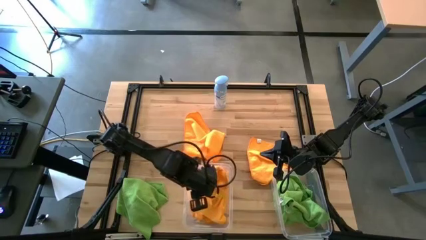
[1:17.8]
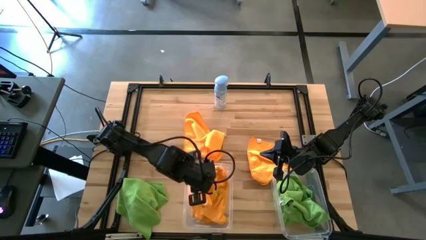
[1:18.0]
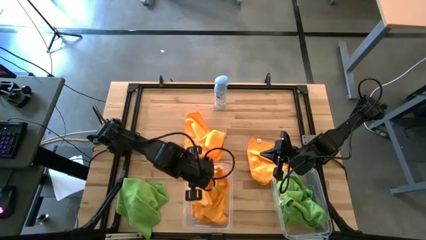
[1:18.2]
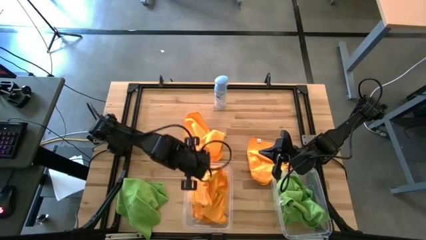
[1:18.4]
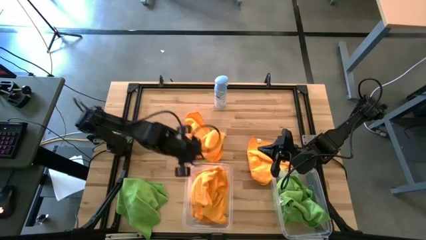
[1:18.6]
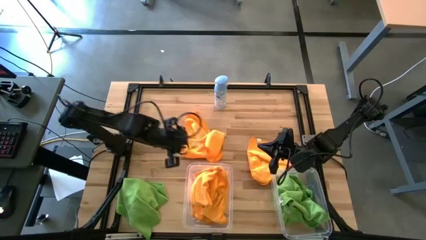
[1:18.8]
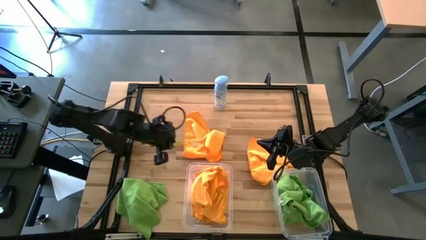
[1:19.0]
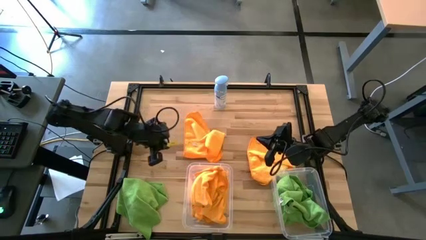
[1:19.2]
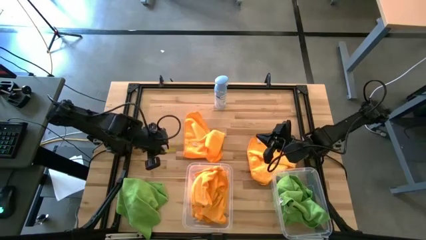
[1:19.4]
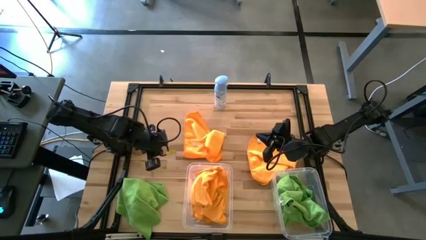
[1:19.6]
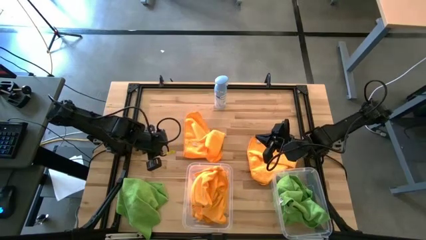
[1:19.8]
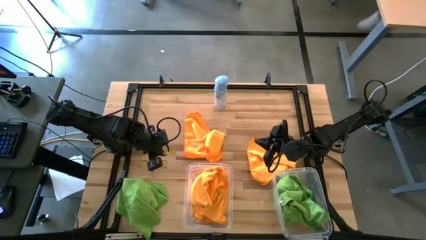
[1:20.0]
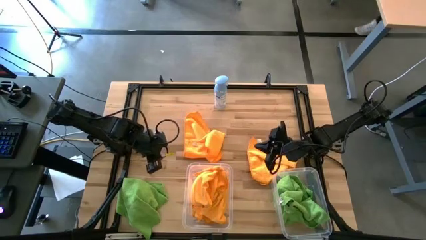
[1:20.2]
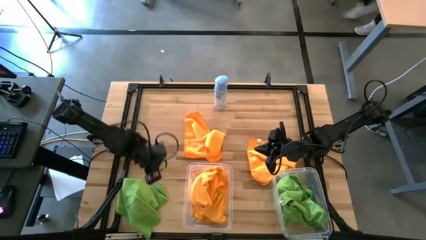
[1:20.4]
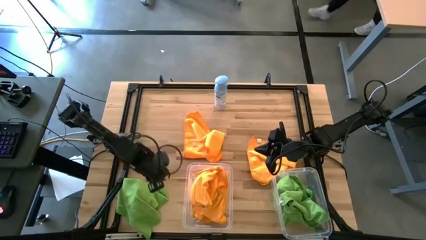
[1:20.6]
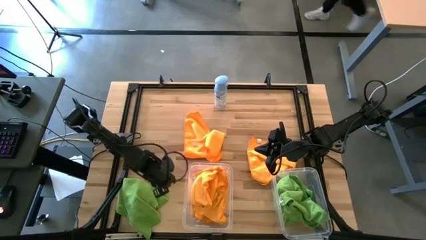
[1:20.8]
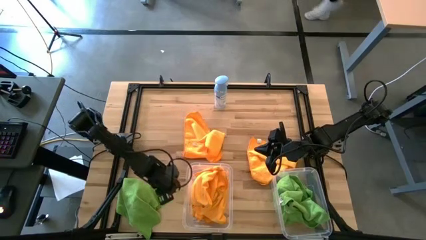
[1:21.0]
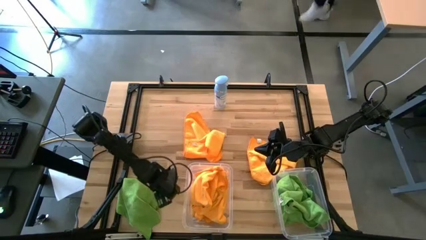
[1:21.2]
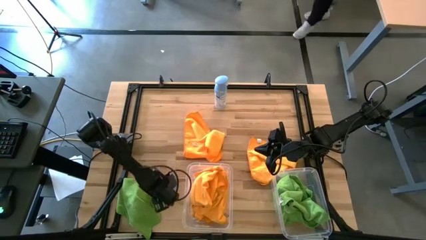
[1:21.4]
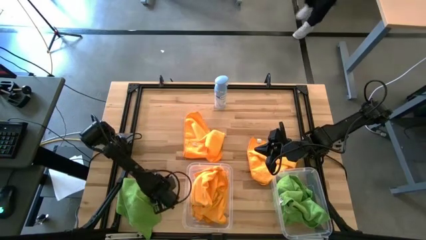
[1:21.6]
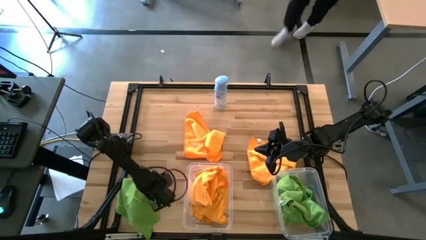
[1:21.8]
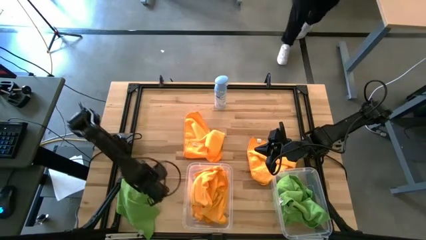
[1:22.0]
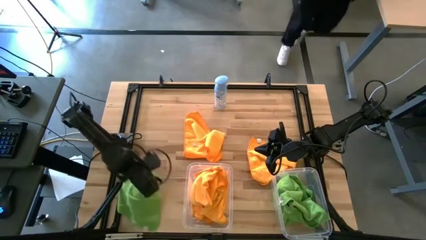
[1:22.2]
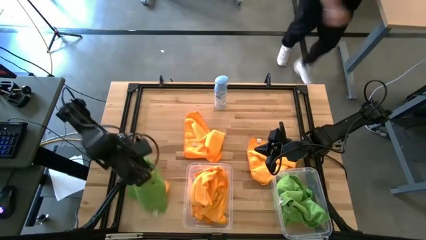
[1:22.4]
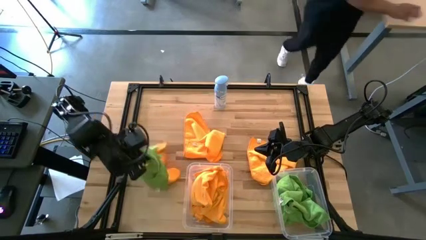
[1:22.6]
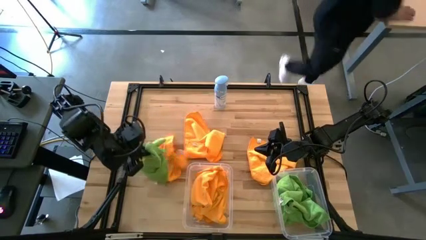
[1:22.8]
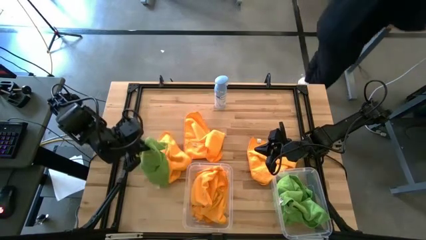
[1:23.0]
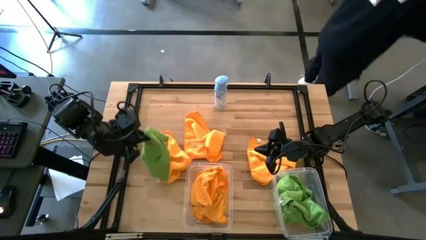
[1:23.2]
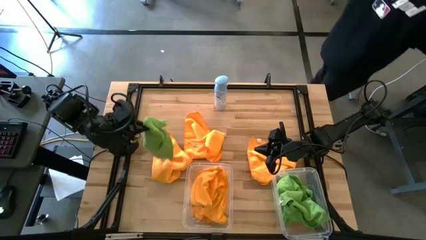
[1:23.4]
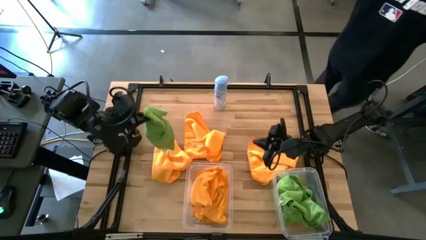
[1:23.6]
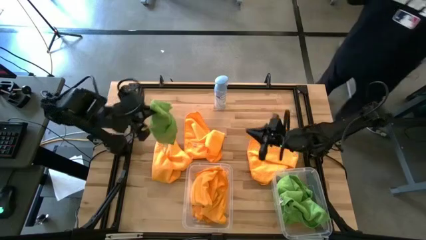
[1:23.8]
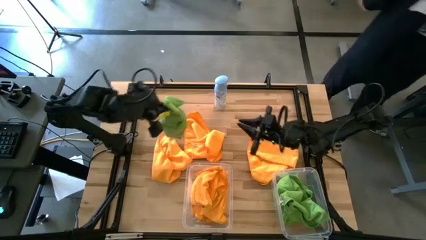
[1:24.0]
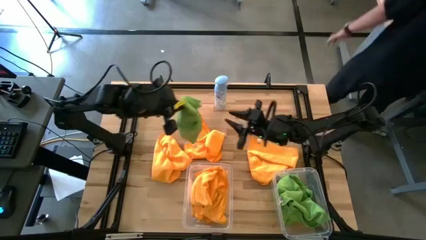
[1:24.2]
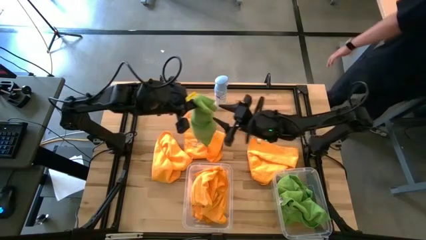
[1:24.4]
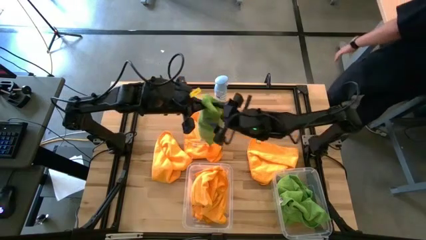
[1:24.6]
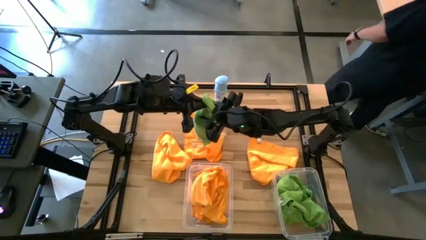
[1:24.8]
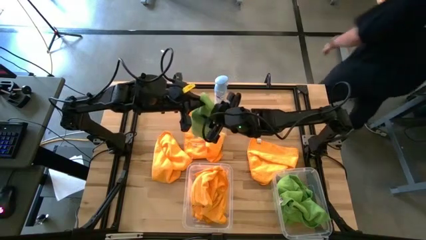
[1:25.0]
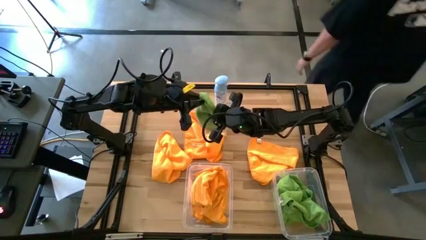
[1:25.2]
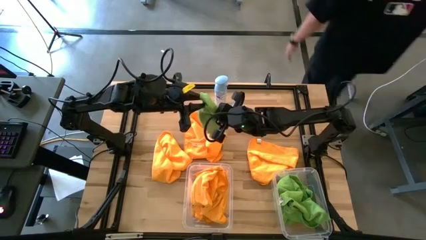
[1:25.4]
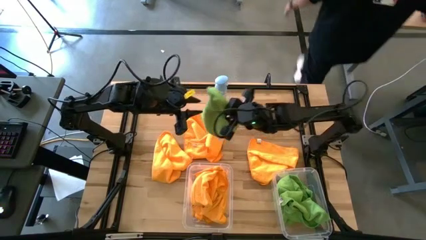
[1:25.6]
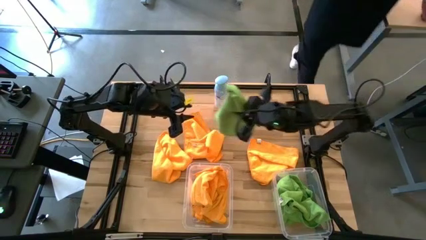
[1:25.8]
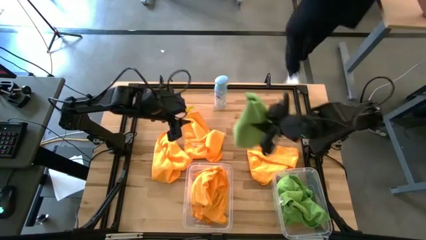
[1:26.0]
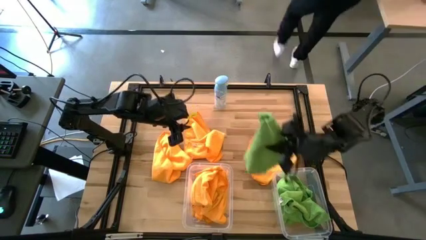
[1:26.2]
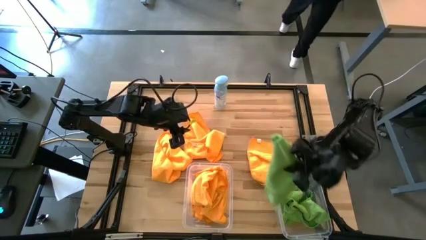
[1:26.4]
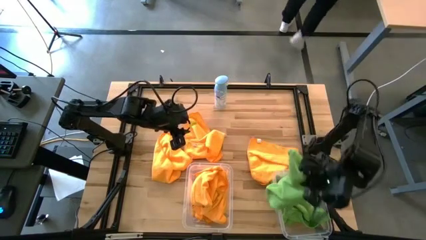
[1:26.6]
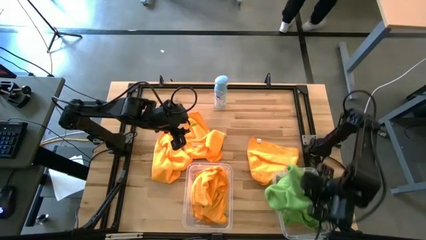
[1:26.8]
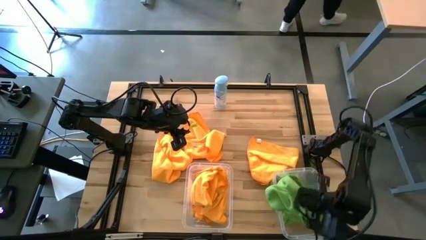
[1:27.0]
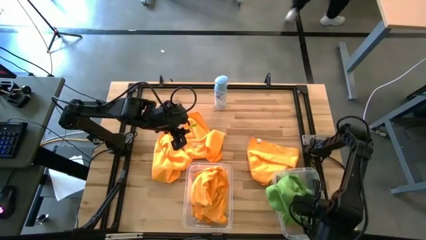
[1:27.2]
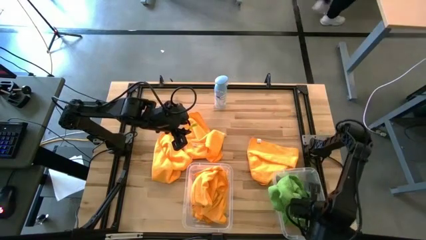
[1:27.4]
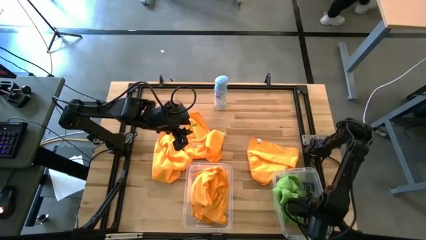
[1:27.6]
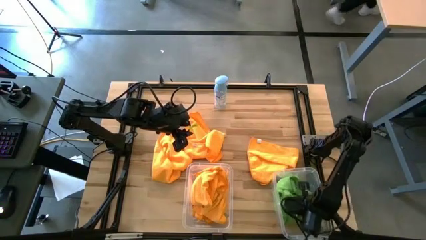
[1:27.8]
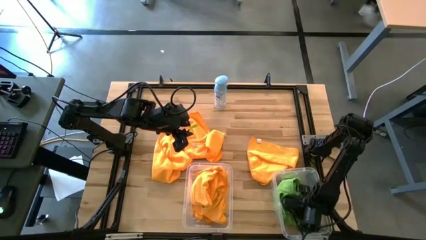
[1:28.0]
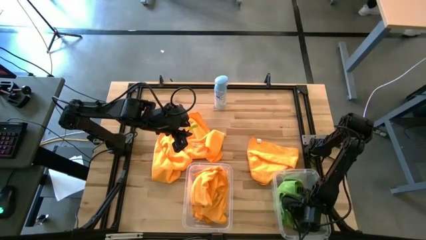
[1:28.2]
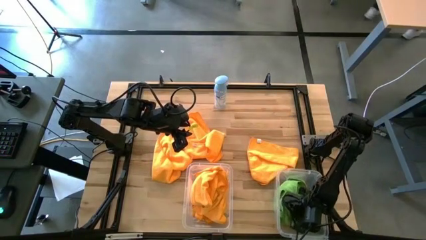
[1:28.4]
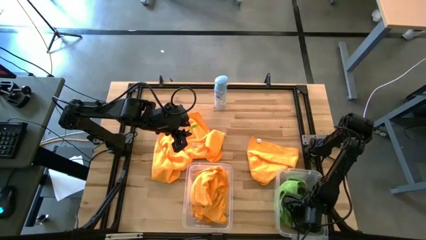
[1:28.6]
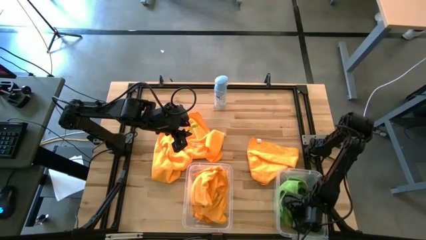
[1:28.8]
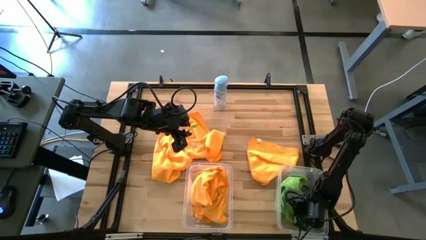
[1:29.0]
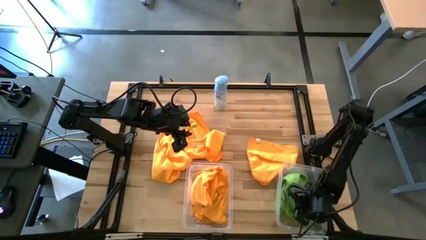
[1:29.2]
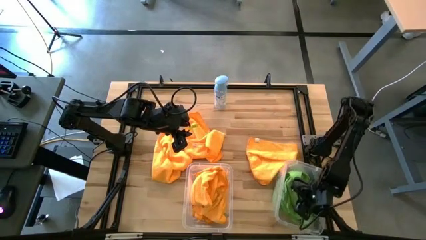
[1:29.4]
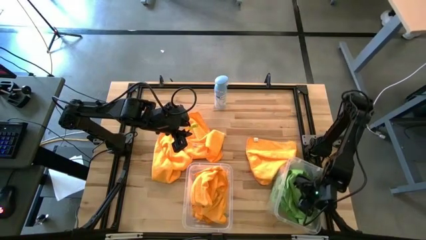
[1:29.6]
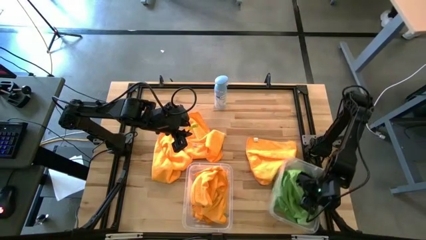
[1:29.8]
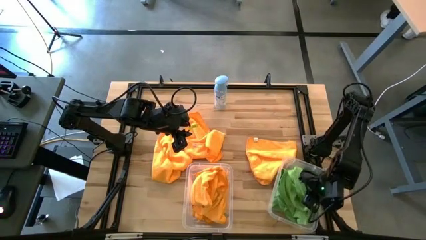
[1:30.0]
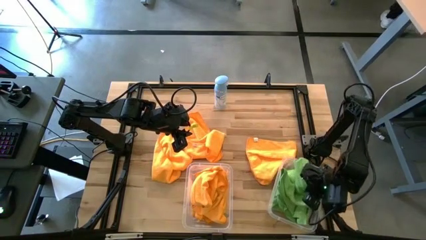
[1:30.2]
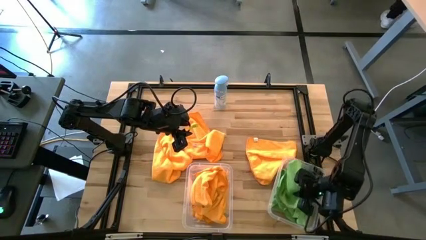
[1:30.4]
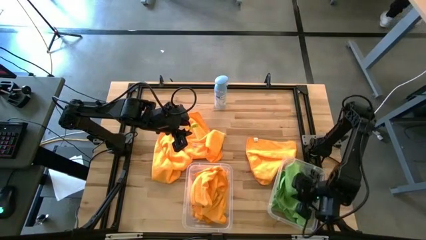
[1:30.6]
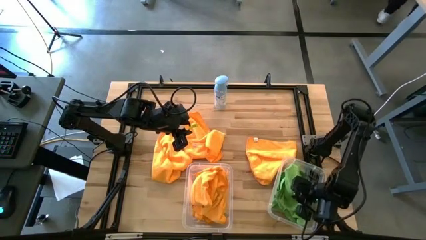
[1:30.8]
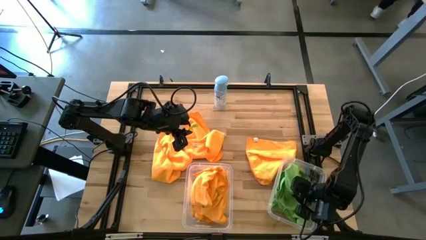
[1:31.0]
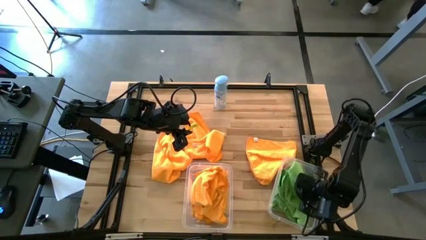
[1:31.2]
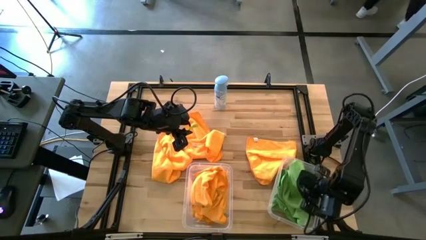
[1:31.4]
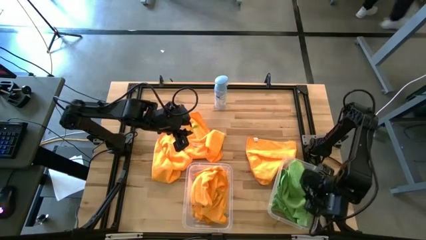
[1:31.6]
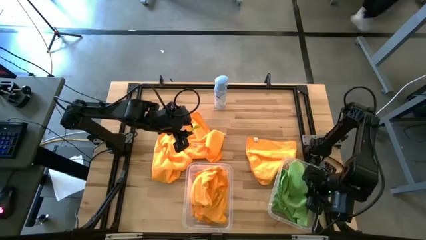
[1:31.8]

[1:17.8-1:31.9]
Task: Sort microfiber towel by color & place in baskets
Put the green towel into the right transparent bin
